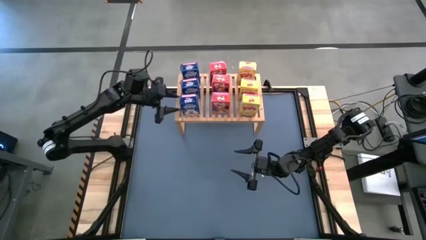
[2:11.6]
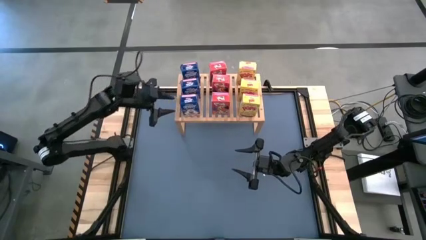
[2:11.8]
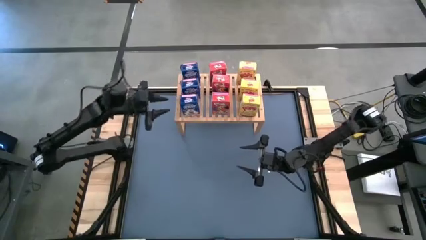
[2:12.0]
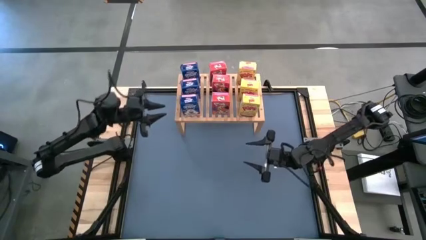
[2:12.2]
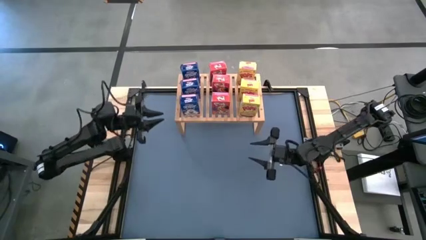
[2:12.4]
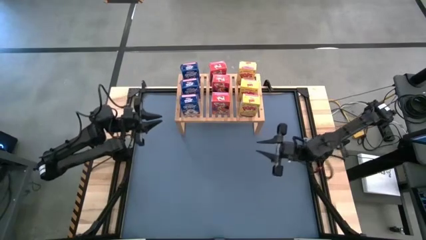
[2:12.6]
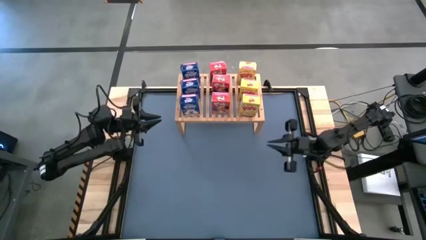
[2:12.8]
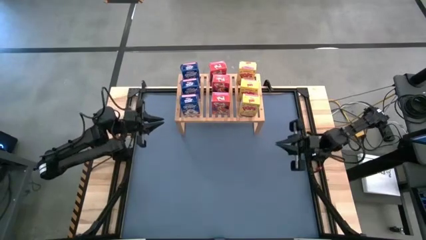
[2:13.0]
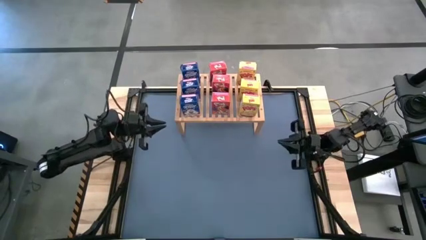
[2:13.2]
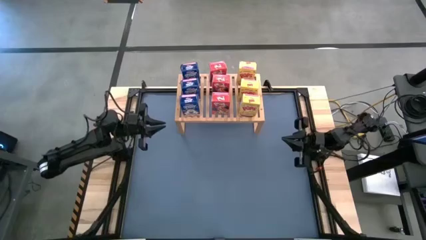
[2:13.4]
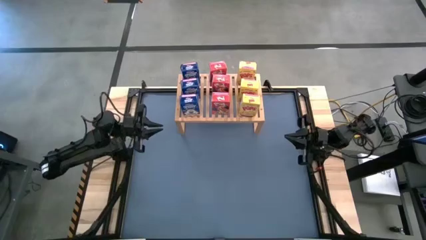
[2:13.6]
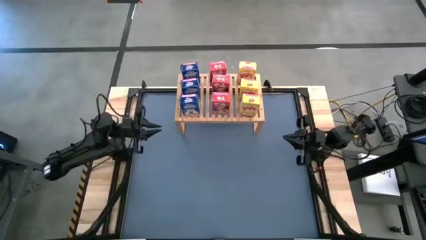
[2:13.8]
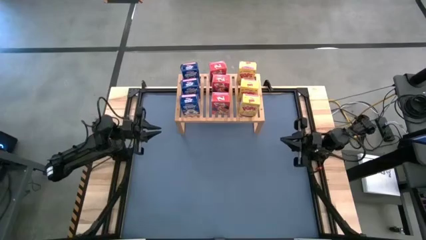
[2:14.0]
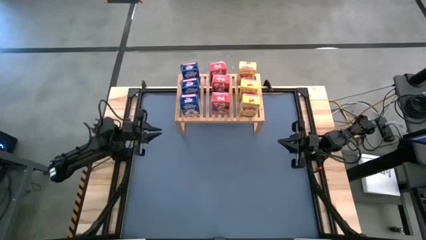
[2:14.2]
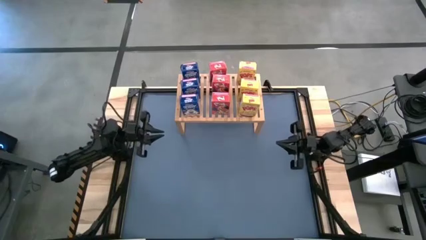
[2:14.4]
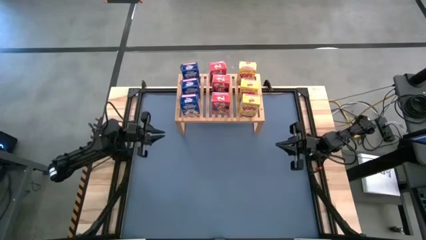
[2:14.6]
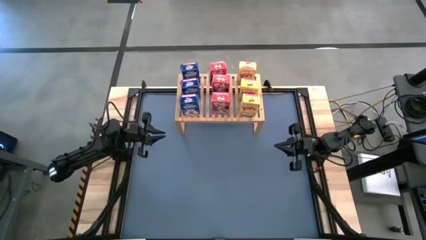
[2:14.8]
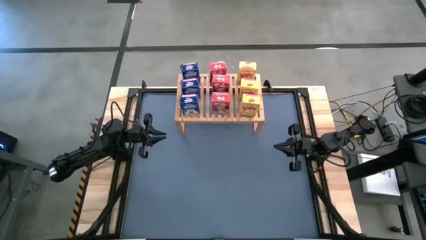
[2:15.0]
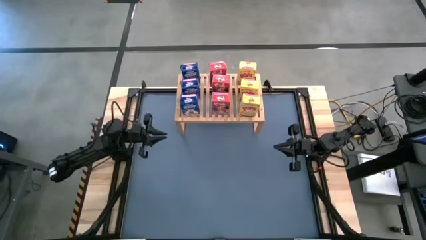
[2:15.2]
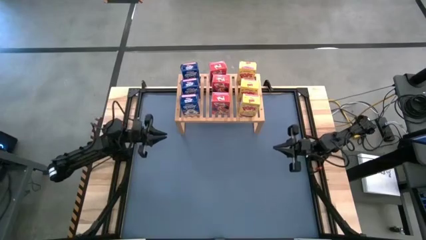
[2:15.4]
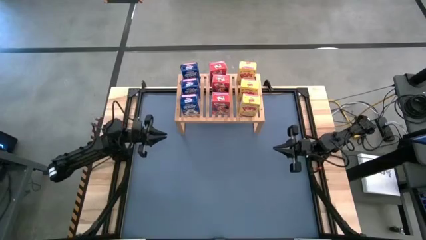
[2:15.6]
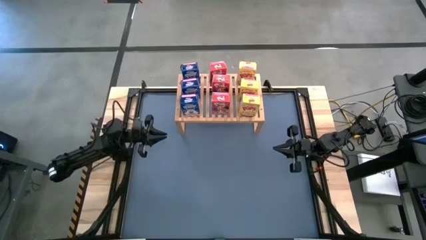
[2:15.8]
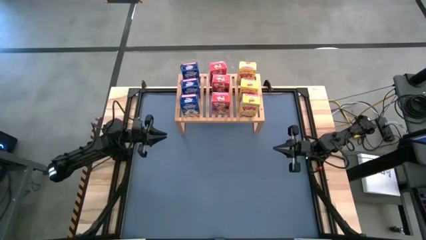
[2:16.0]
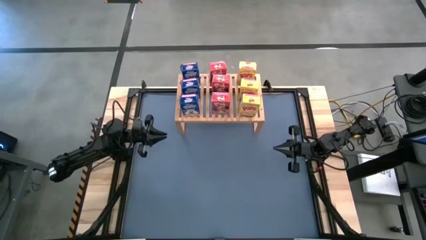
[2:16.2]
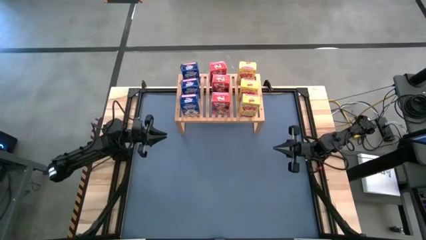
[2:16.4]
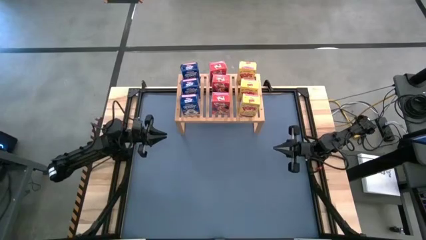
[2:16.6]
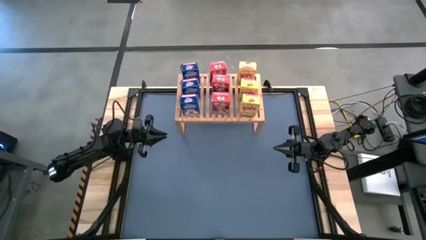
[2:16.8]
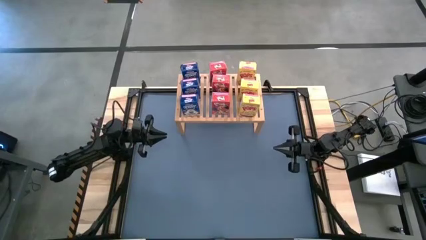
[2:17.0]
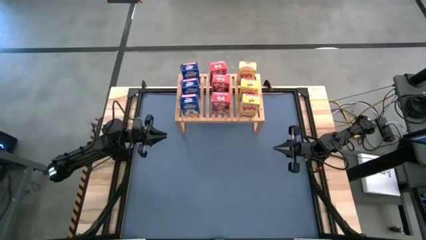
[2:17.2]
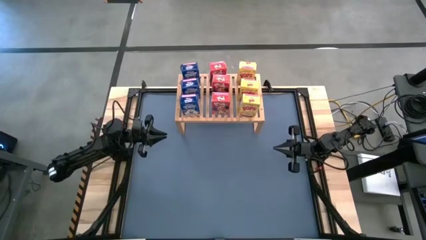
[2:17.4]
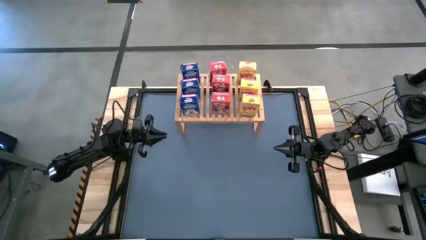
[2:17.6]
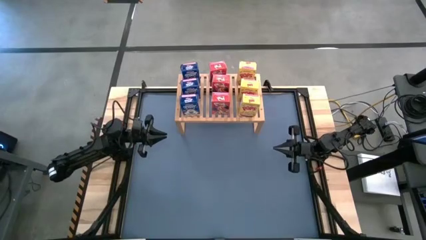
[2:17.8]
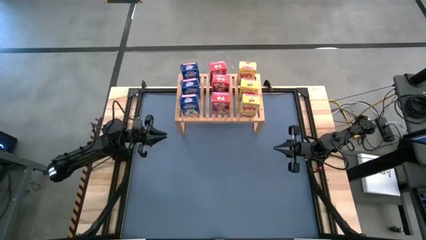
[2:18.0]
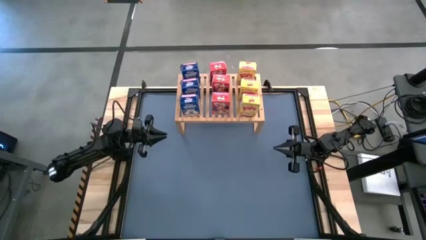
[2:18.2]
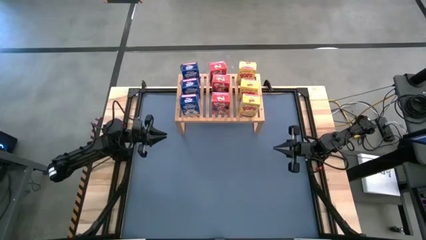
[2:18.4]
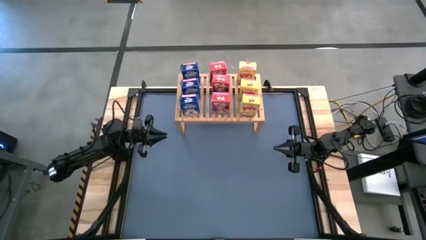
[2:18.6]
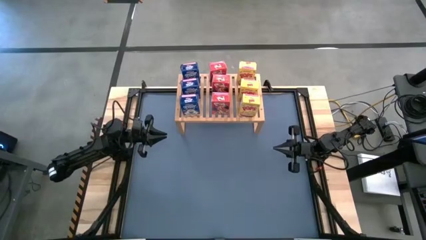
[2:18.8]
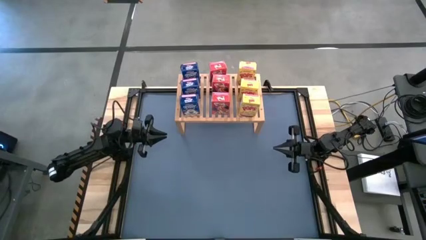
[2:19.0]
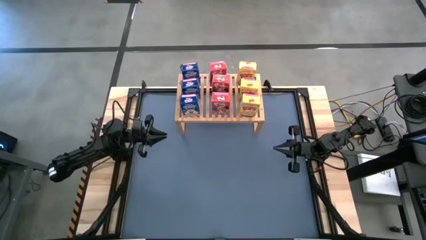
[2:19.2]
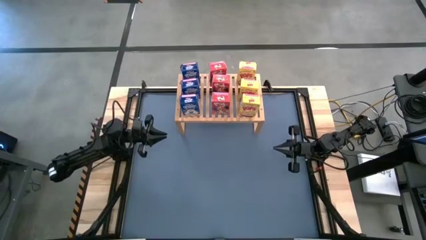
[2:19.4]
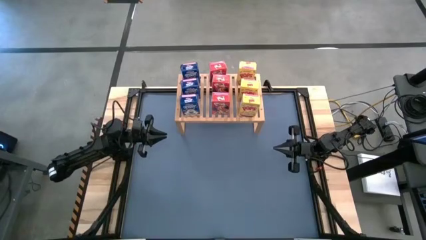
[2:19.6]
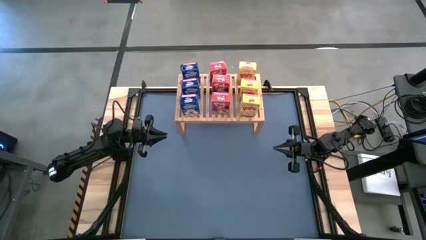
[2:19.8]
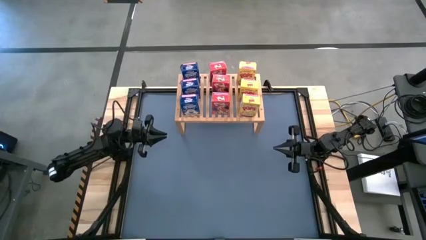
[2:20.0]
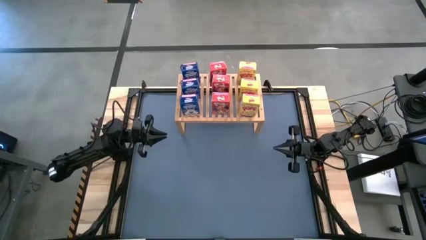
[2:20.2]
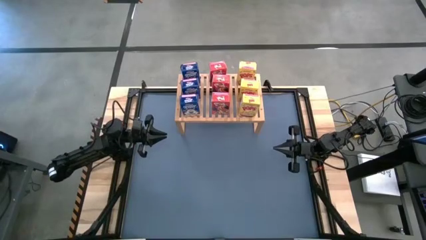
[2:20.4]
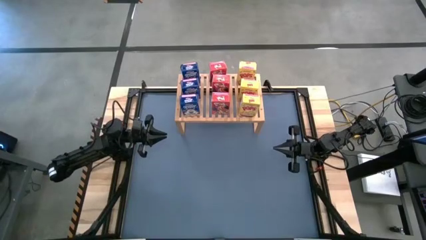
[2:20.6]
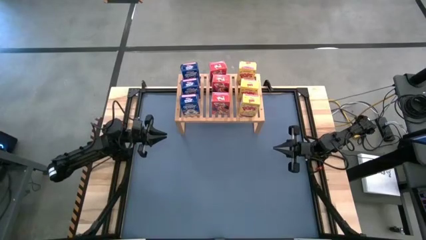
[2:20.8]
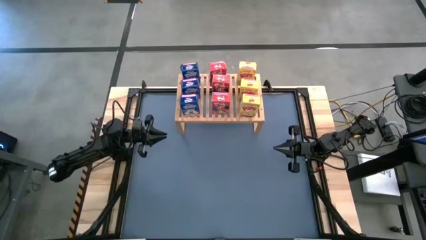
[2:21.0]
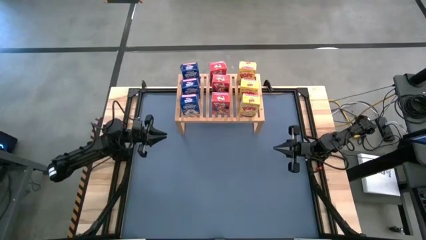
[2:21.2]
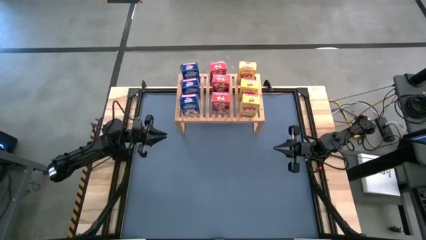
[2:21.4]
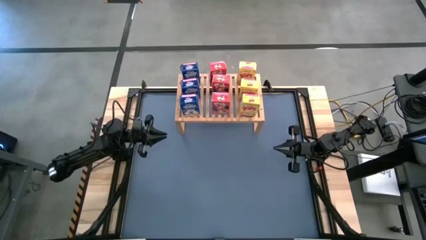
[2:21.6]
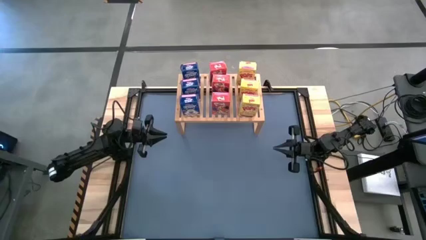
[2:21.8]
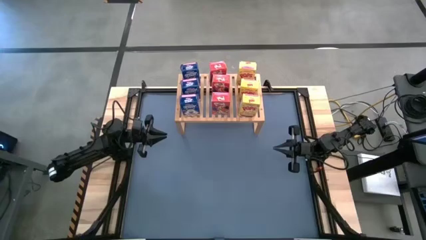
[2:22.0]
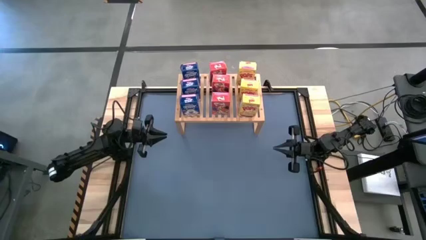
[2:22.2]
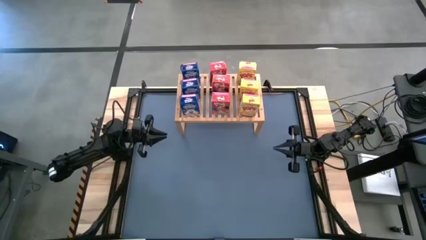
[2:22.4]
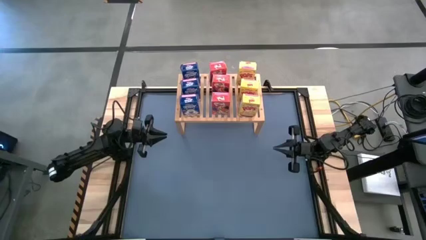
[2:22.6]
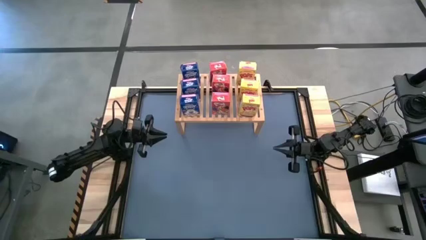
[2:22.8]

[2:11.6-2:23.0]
Task: Stack cereal on shelf
Return to Home Position

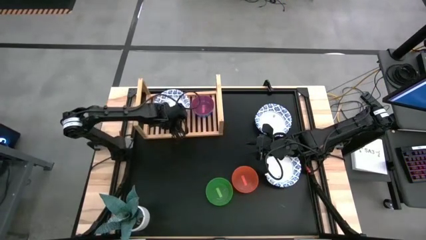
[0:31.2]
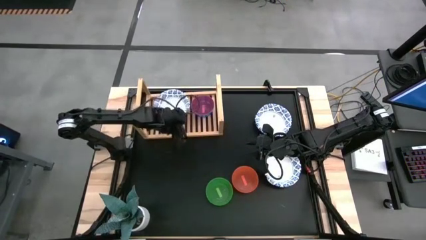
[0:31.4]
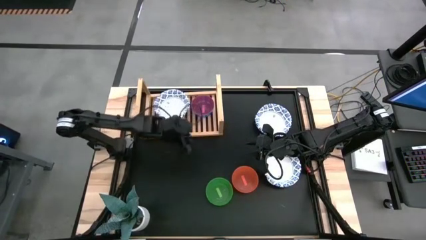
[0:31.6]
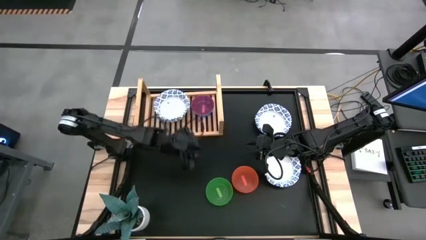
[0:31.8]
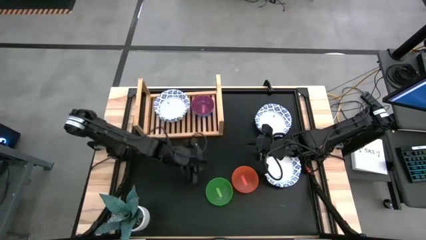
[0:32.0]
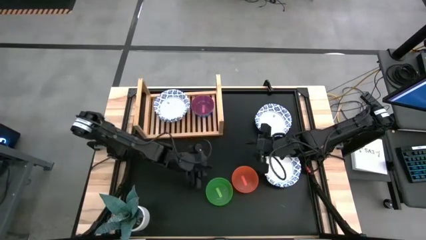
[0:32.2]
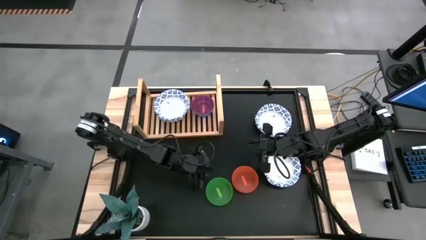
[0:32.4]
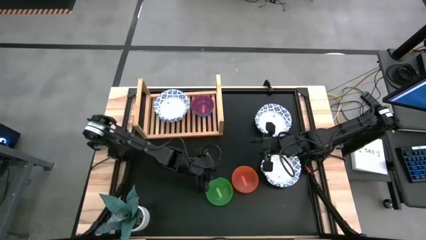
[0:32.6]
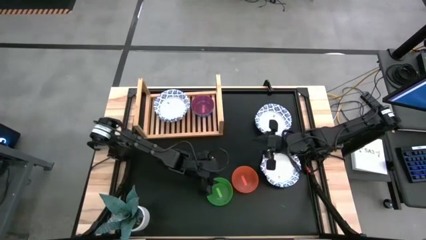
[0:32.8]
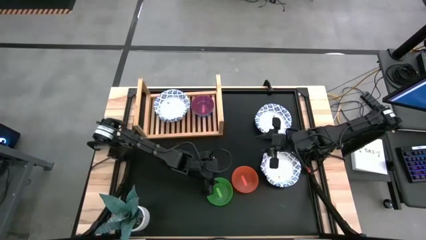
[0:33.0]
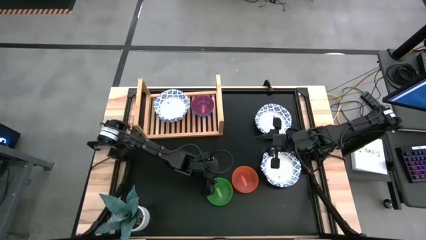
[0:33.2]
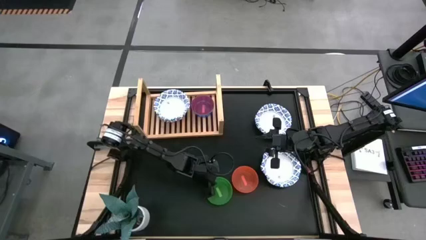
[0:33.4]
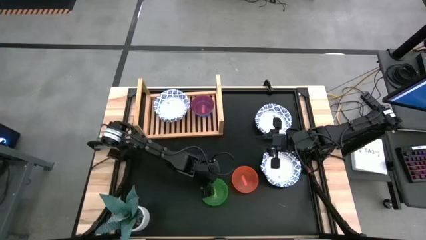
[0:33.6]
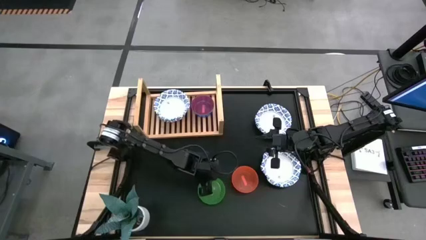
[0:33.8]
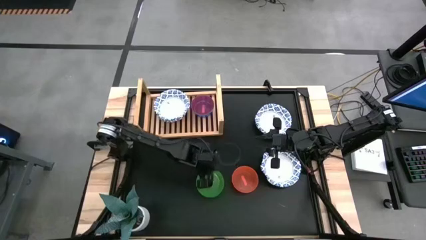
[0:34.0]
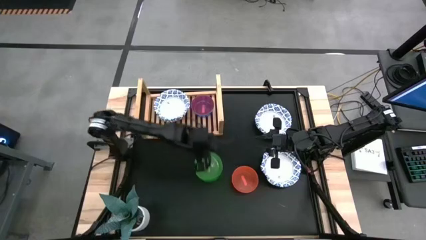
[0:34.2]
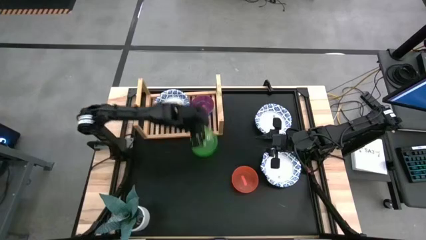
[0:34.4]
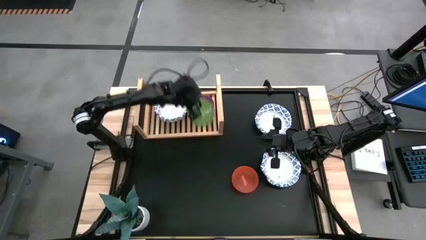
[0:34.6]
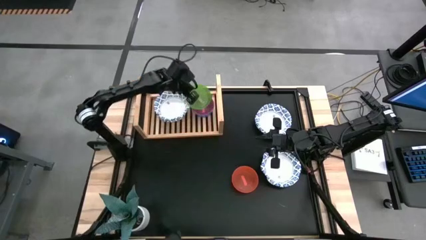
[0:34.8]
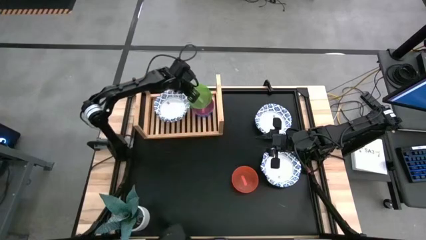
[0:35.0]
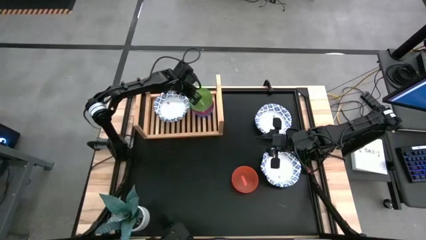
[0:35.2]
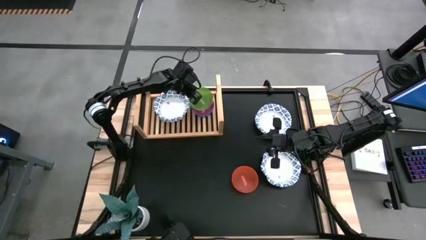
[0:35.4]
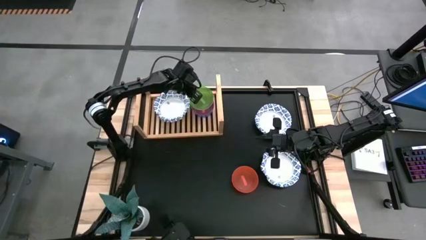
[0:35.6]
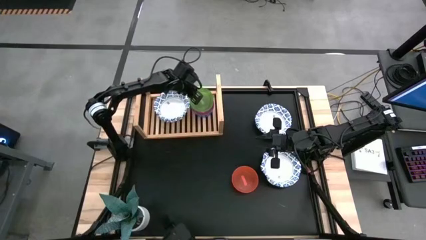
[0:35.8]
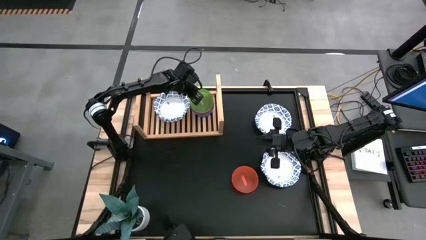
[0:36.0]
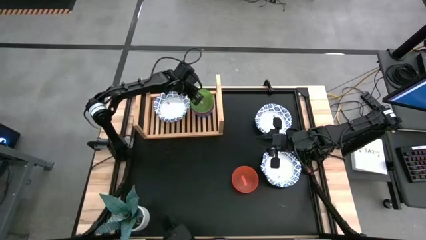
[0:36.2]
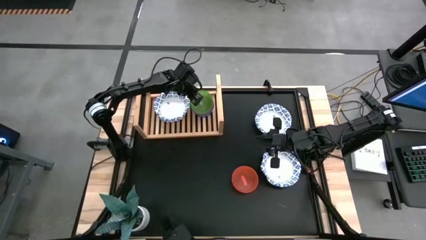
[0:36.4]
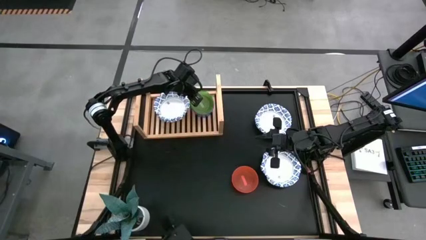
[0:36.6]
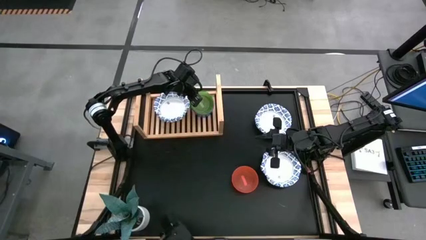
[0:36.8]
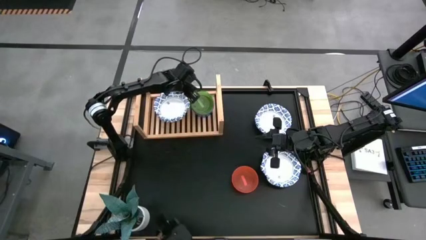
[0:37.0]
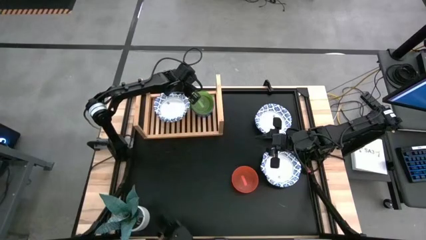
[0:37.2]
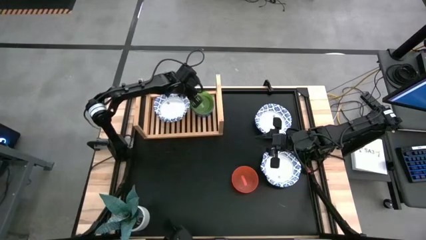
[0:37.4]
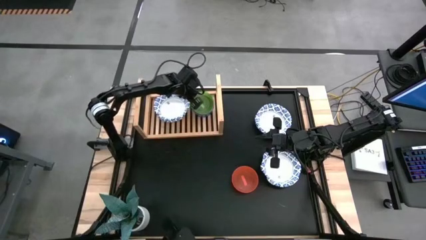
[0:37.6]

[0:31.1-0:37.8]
Task: Place and stack bowls onto a shelf
Stack the green bowl on top of the pink bowl on the shelf
